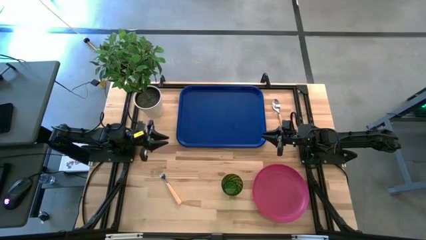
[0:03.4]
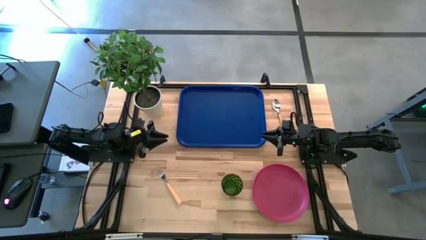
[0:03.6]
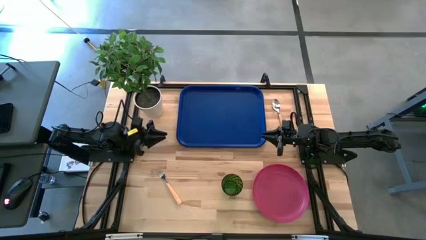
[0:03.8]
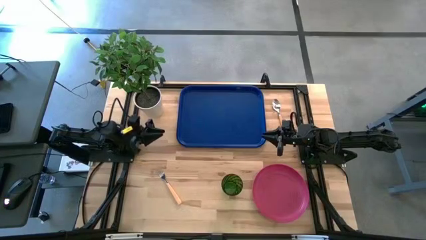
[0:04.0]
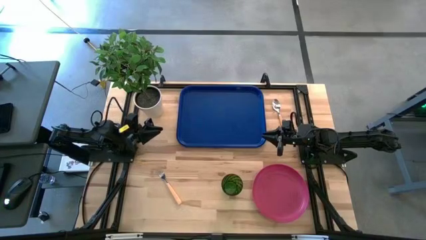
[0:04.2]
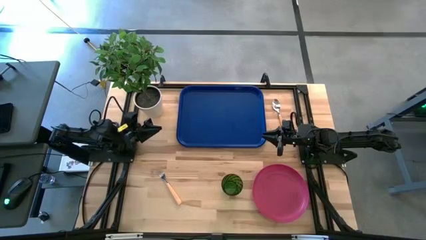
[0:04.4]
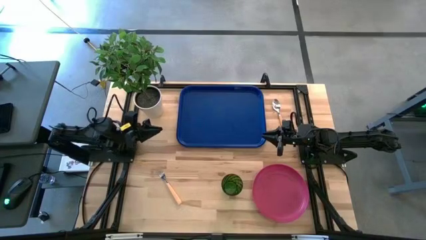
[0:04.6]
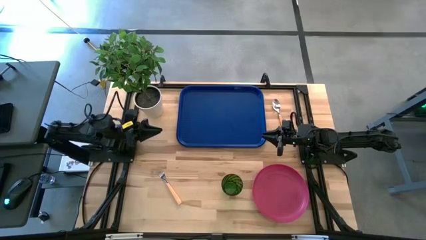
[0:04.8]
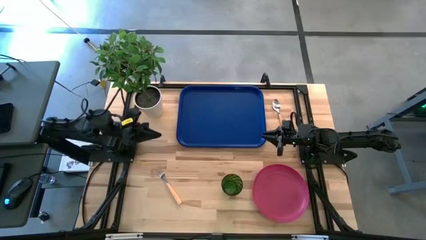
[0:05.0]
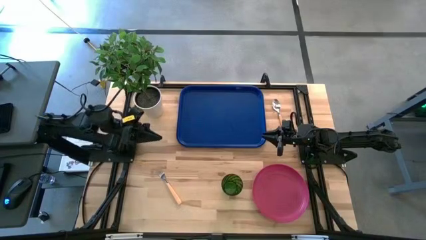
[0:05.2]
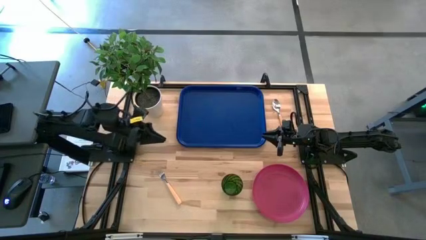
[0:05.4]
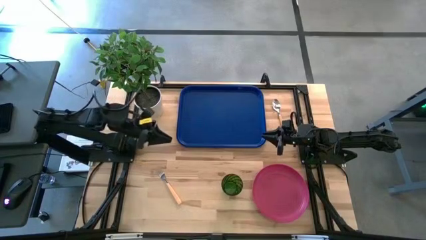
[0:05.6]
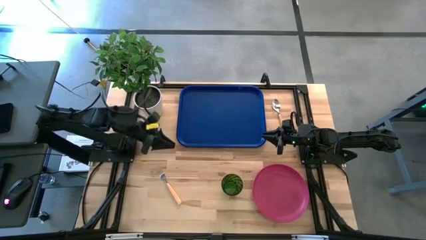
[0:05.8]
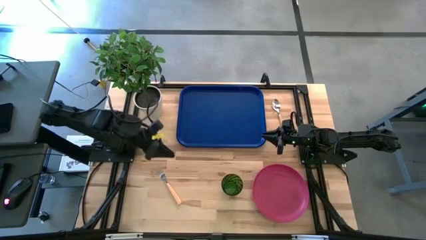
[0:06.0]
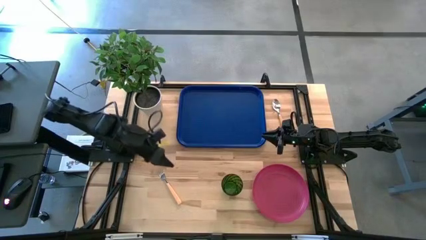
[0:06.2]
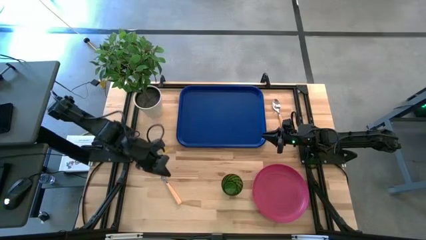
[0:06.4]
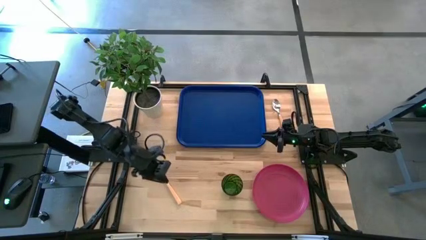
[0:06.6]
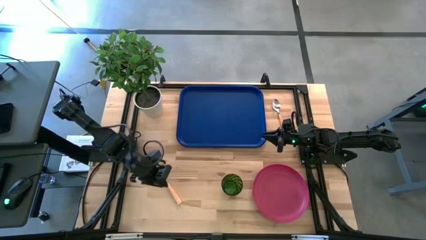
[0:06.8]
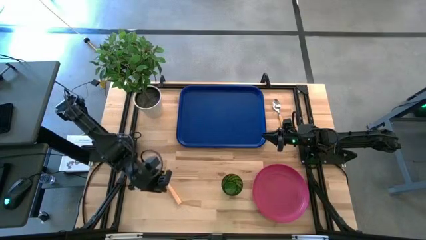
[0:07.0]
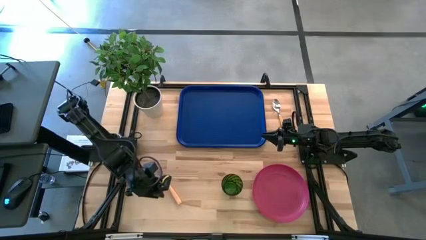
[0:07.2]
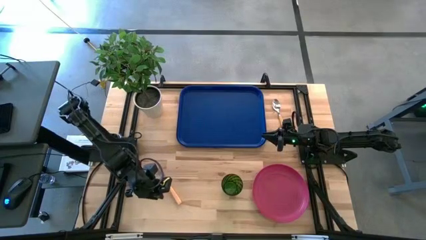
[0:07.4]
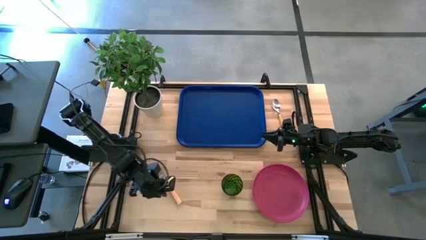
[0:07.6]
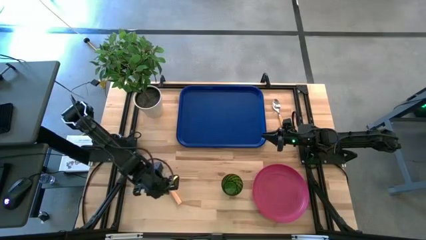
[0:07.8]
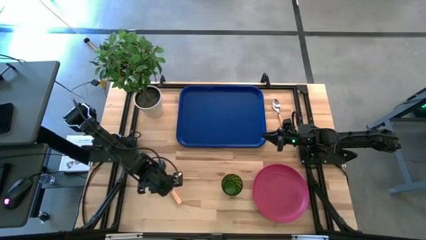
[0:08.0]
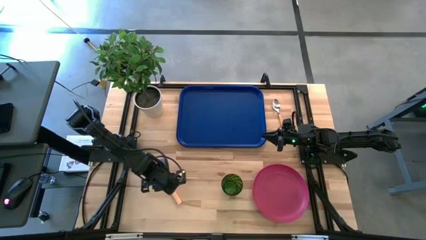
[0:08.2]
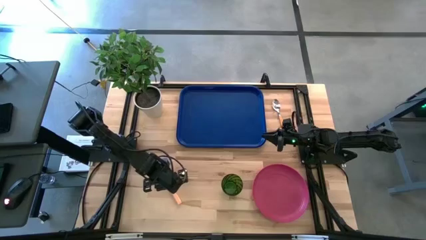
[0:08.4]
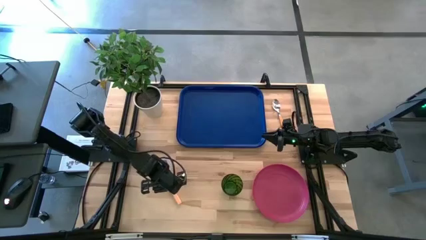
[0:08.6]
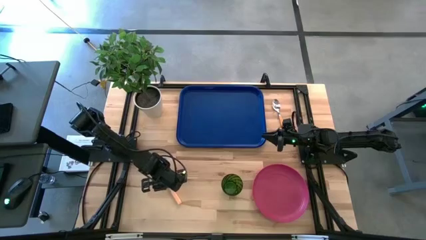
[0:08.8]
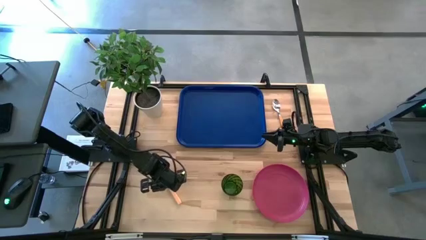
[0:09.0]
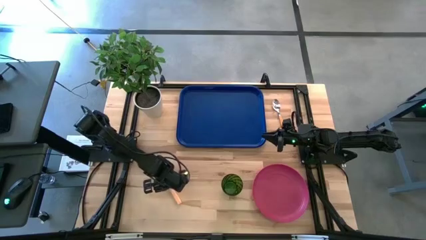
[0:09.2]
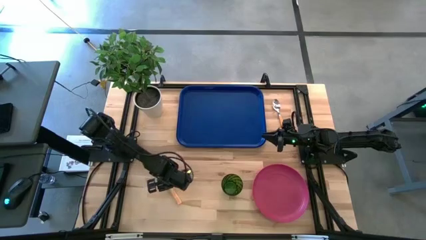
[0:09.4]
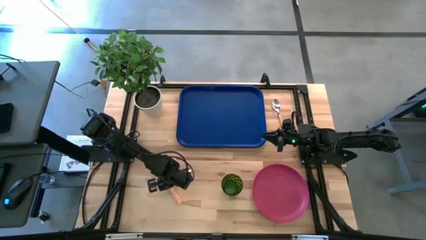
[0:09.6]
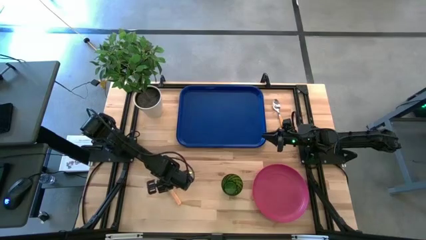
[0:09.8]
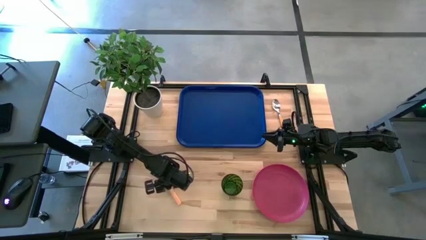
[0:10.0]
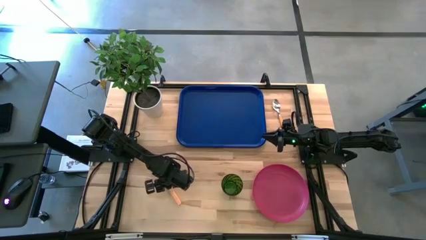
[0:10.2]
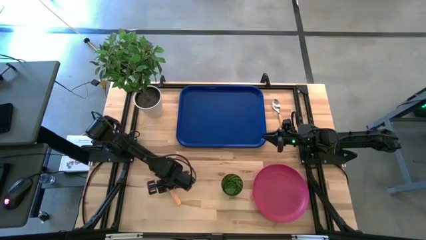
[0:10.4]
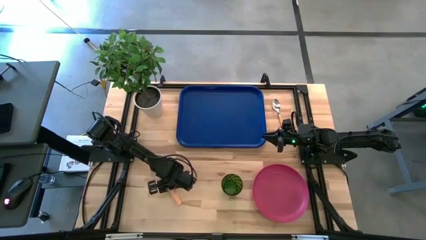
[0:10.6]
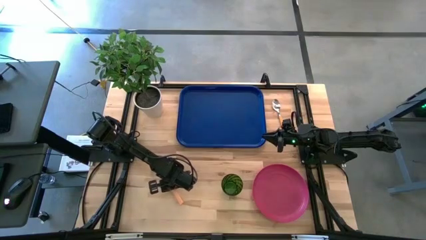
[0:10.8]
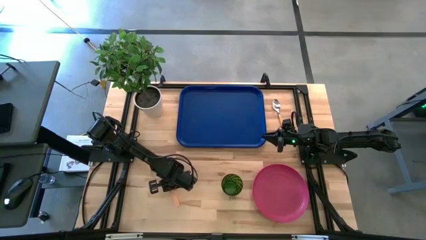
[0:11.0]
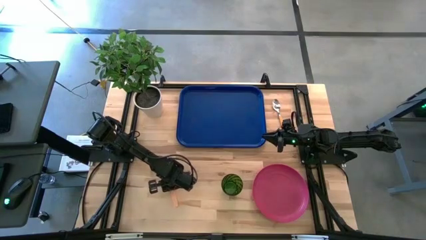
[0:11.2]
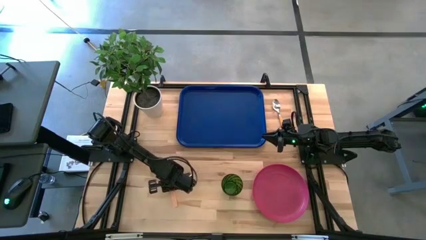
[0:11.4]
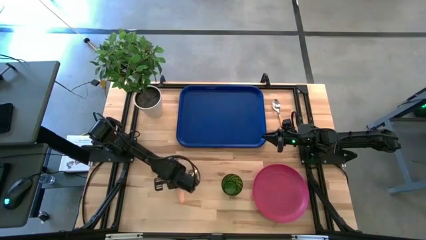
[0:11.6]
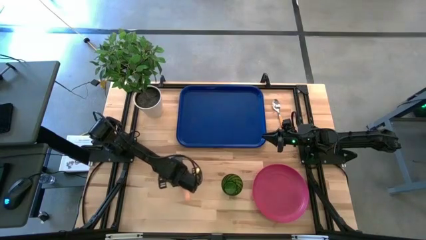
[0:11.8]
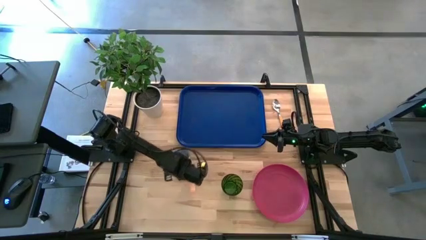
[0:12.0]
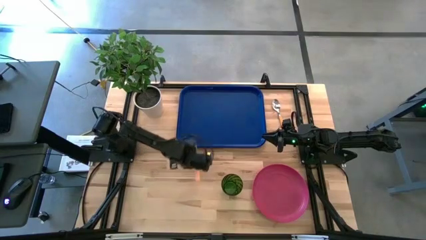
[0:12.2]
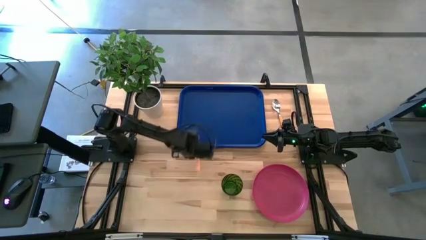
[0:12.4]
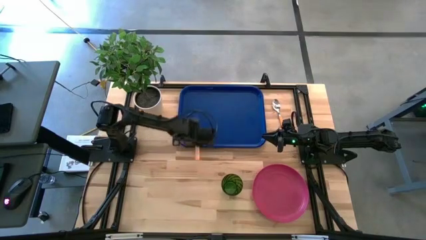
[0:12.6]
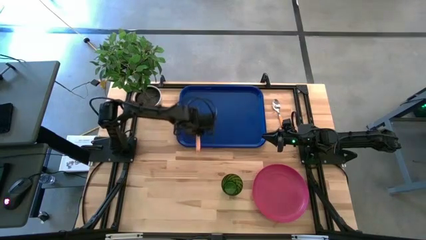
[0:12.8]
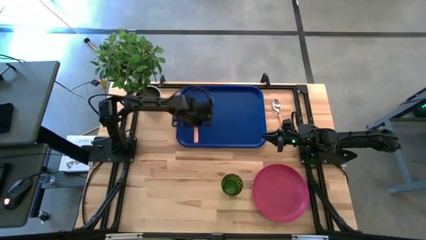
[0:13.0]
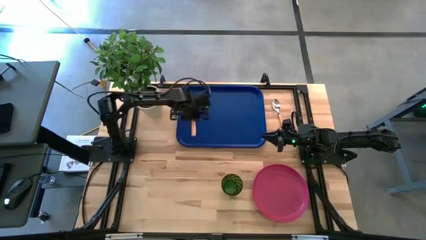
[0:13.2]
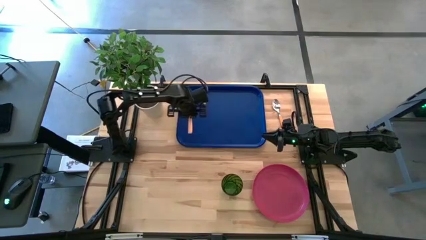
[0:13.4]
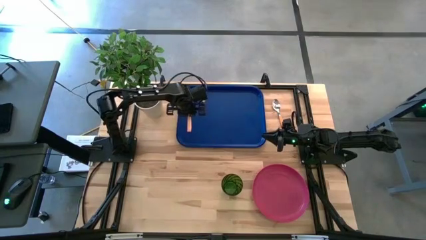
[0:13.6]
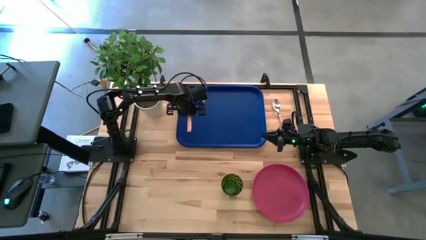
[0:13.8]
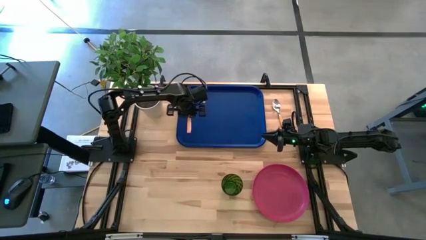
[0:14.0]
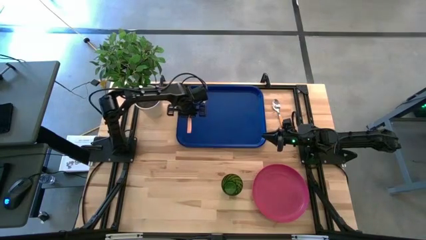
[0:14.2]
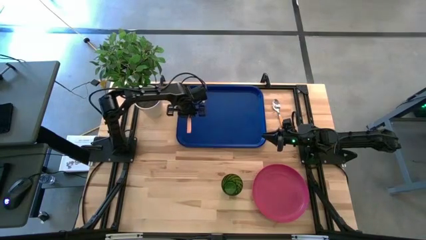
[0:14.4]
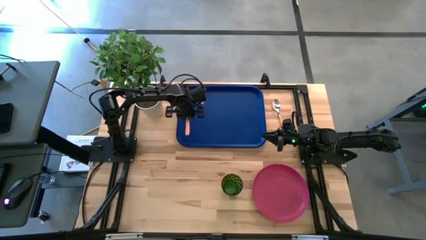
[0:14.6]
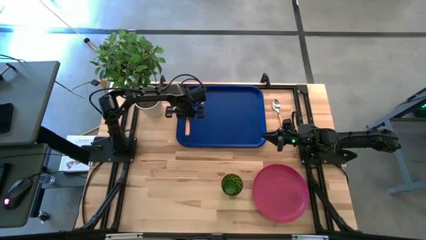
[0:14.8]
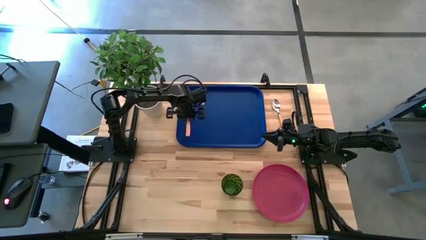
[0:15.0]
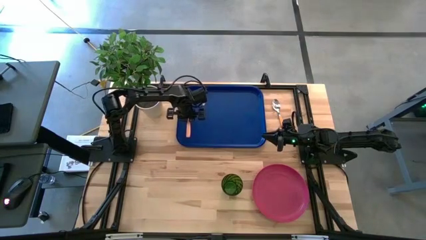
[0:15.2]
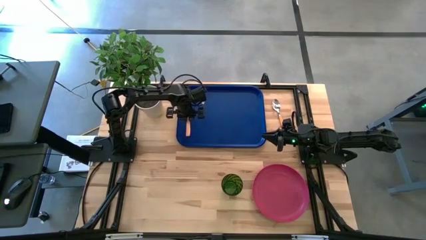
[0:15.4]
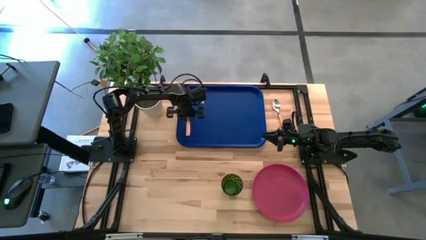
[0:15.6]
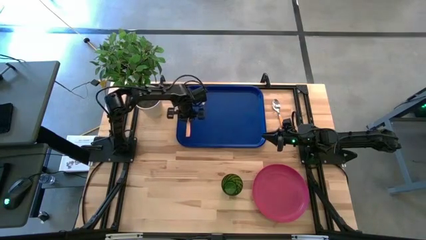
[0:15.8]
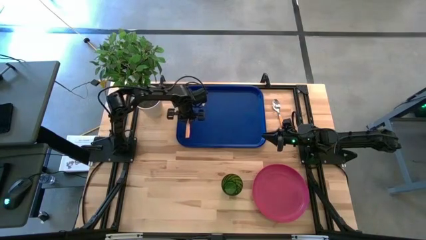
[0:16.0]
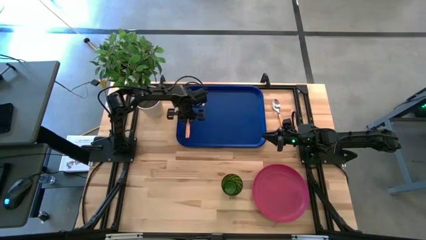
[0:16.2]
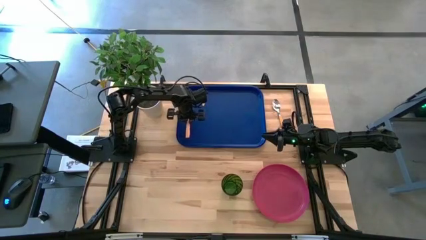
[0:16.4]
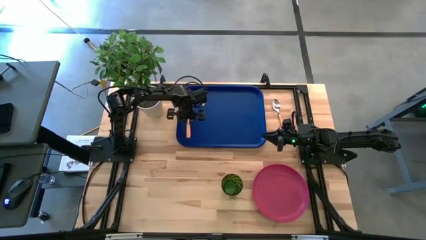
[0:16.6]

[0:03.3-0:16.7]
Task: Pick and place plate/cup/fork/spoon on tray
Put the light orange fork on the blue serving tray

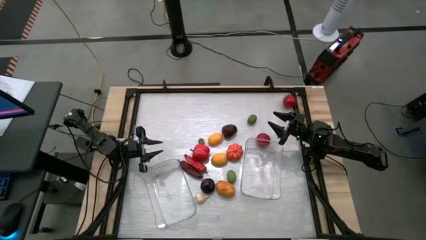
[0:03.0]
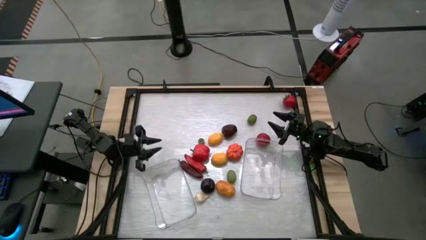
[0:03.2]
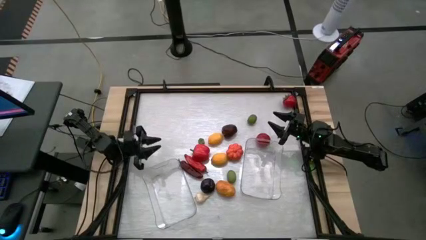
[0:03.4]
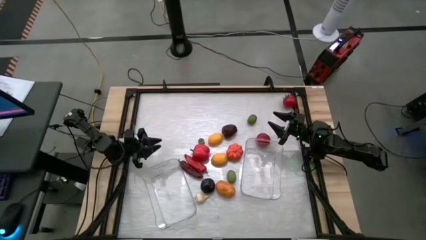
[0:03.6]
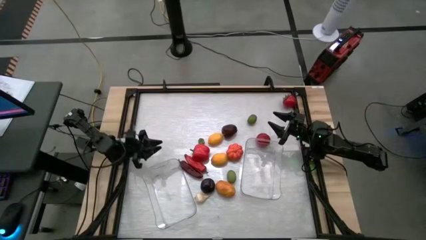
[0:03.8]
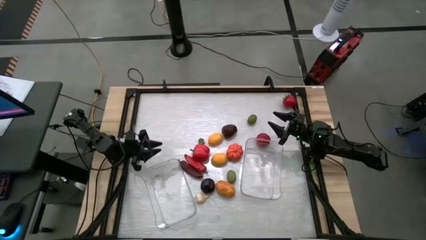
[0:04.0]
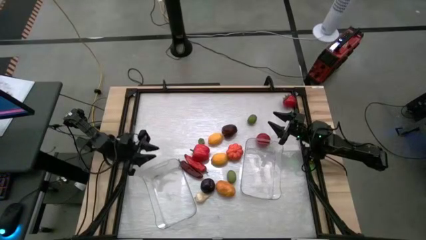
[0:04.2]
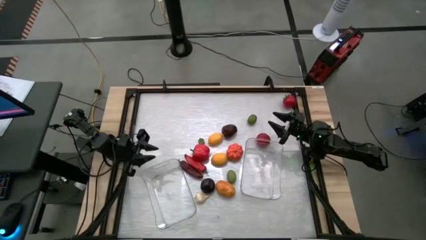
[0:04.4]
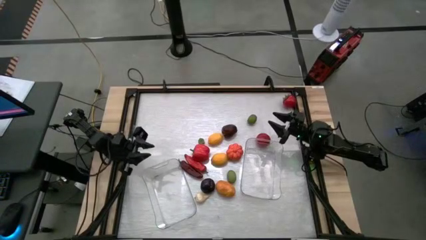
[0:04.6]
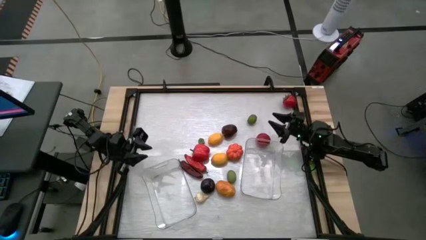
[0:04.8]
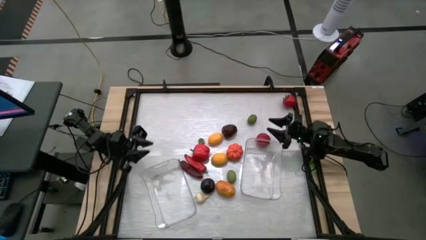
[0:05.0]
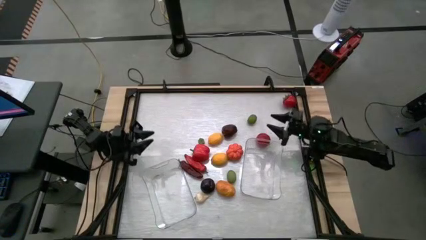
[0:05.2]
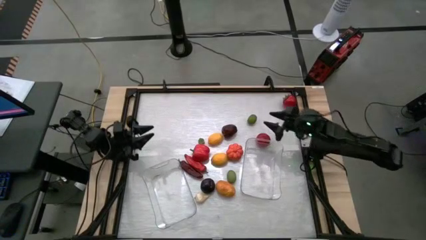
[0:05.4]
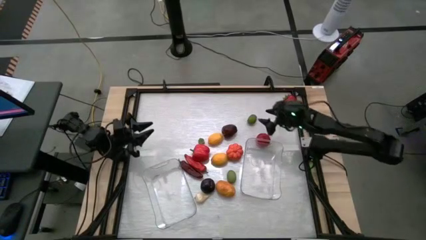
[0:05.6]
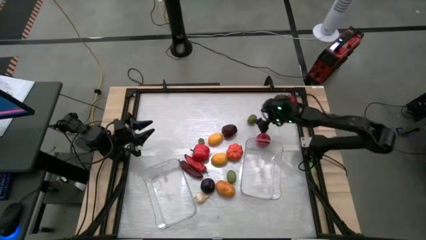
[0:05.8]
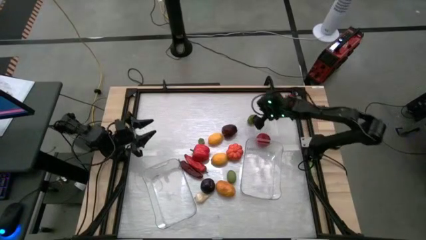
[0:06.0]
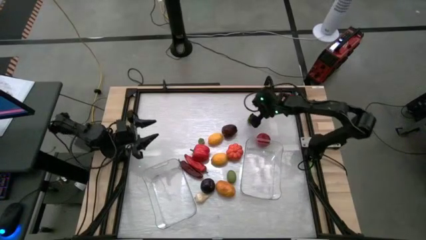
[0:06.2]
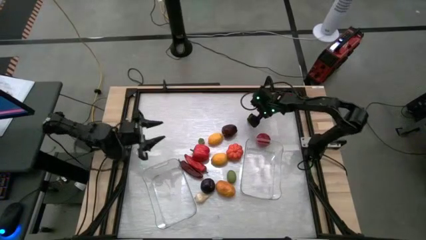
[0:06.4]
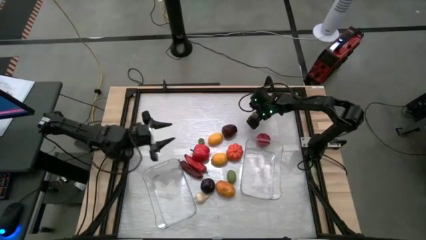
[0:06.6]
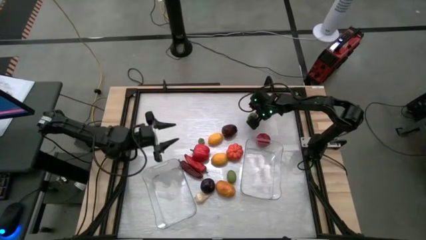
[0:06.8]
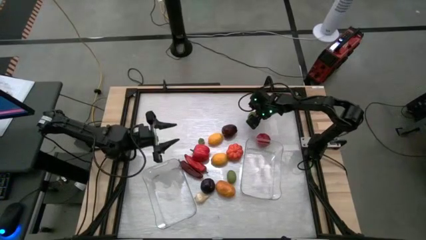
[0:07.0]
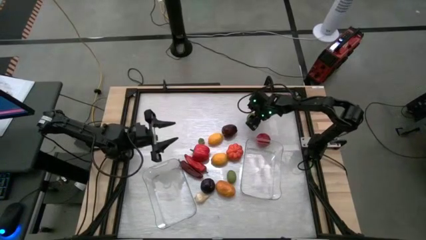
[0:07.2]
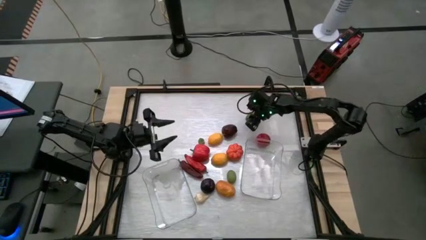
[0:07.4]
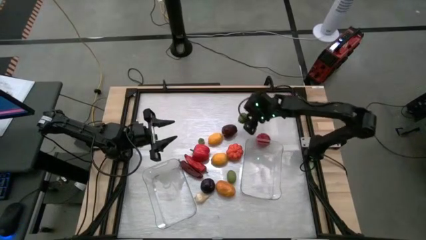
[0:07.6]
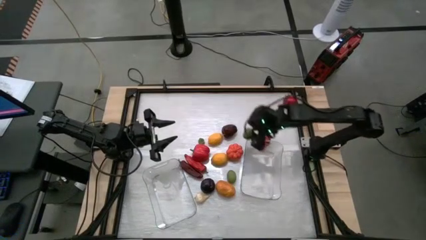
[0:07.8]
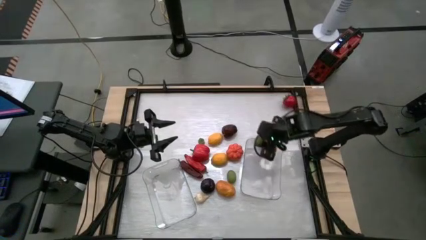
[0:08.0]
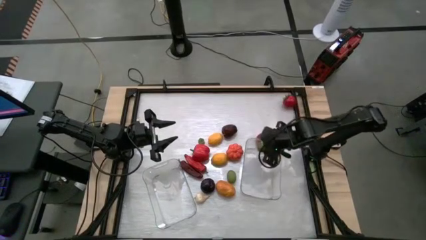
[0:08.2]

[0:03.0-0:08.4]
Task: Sort produce into baskets
Put the top lime into the right transparent bin
